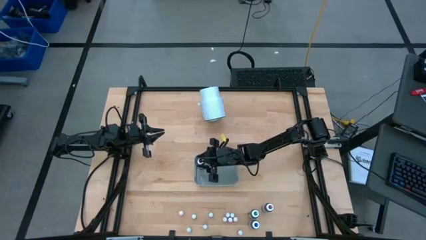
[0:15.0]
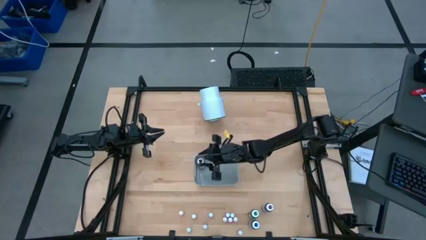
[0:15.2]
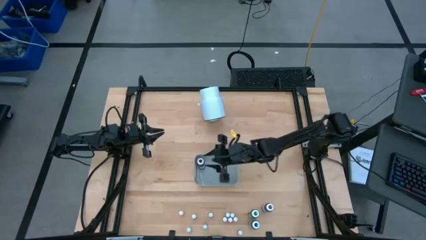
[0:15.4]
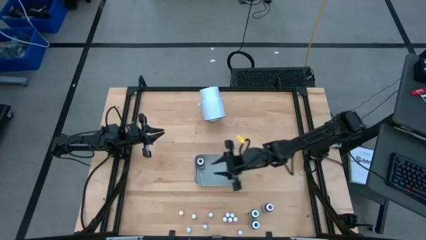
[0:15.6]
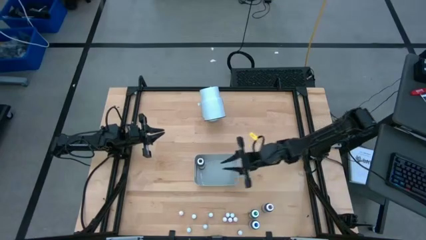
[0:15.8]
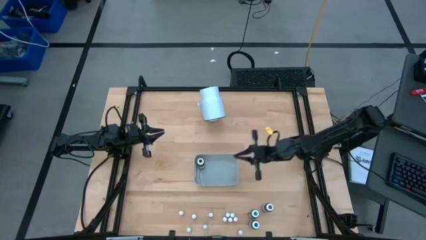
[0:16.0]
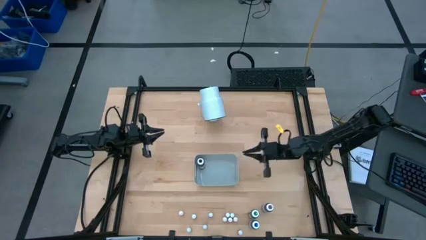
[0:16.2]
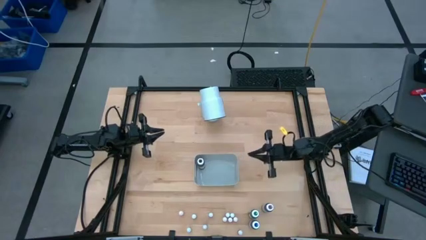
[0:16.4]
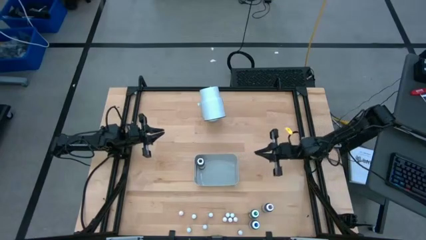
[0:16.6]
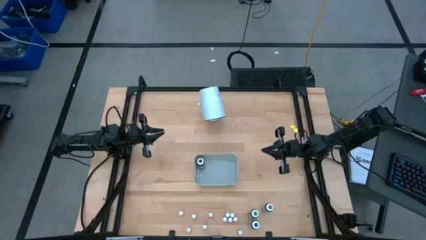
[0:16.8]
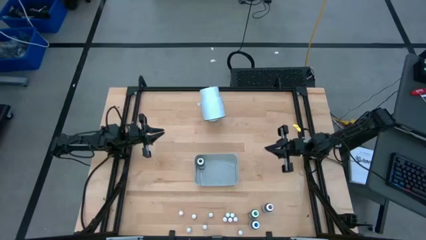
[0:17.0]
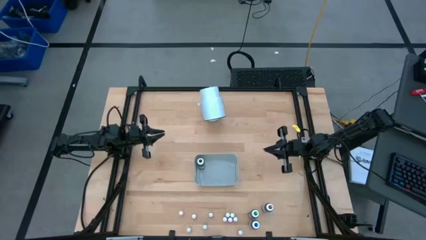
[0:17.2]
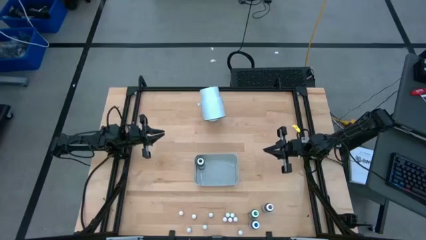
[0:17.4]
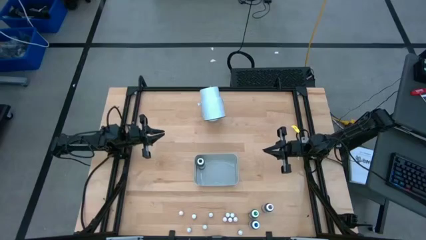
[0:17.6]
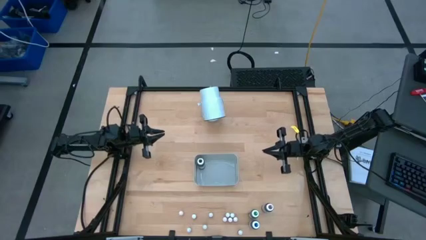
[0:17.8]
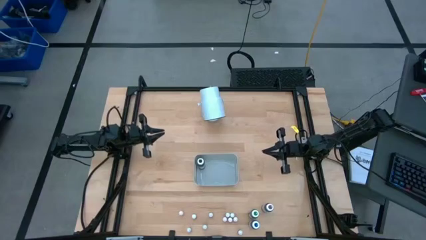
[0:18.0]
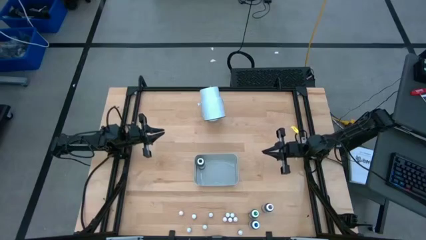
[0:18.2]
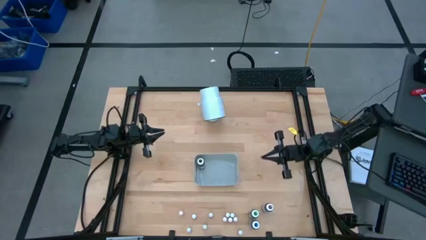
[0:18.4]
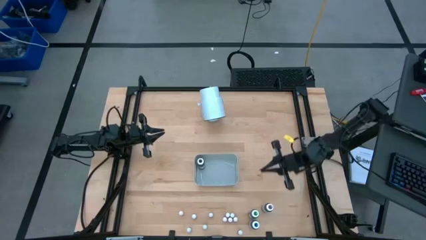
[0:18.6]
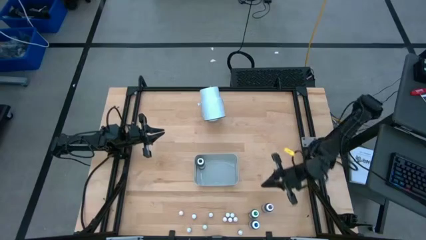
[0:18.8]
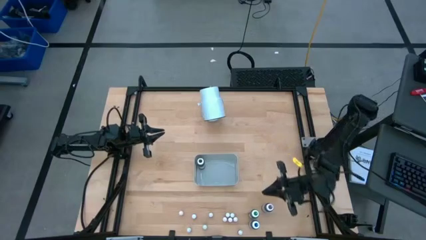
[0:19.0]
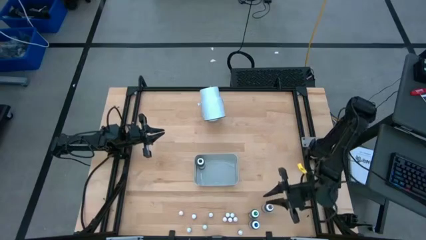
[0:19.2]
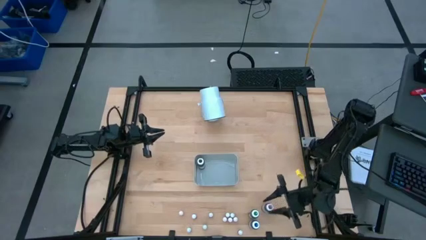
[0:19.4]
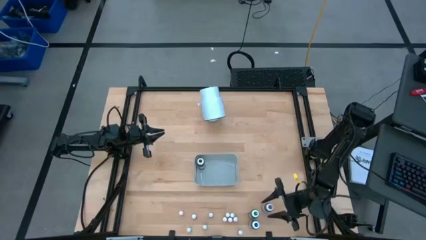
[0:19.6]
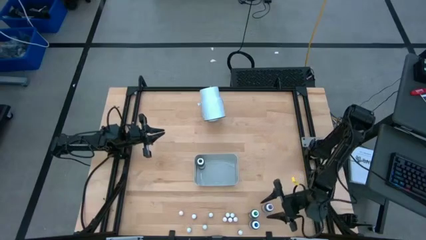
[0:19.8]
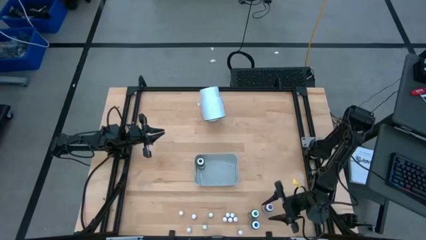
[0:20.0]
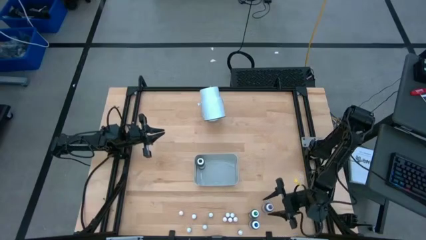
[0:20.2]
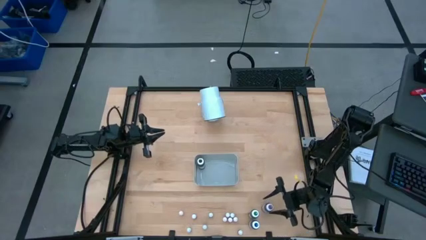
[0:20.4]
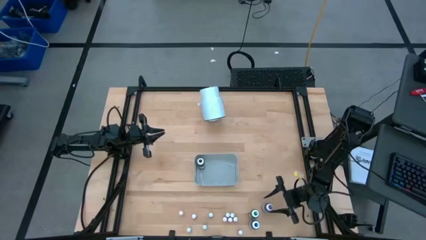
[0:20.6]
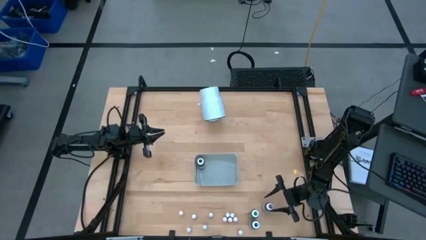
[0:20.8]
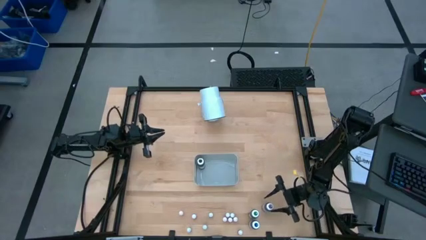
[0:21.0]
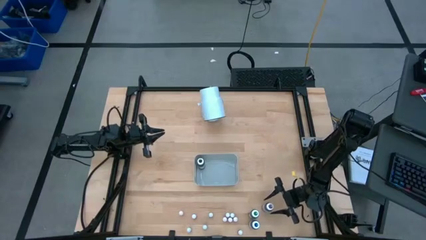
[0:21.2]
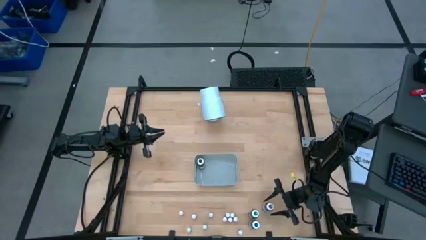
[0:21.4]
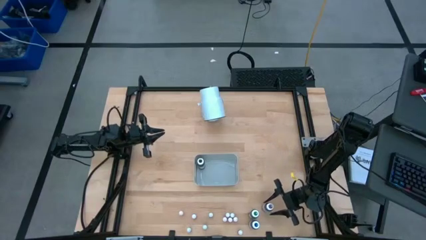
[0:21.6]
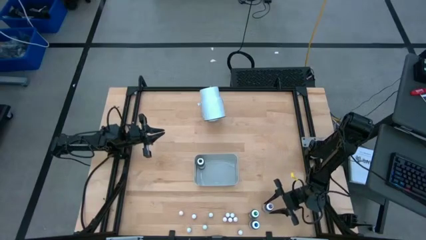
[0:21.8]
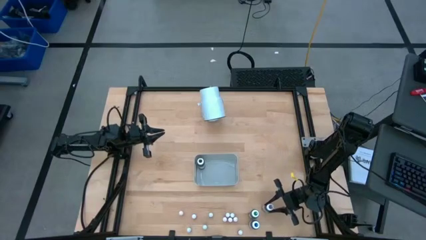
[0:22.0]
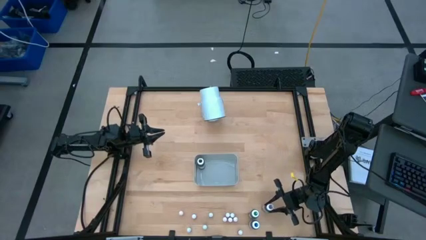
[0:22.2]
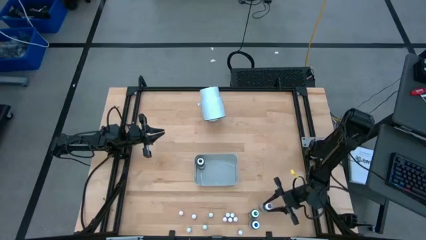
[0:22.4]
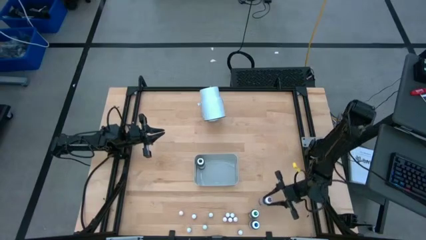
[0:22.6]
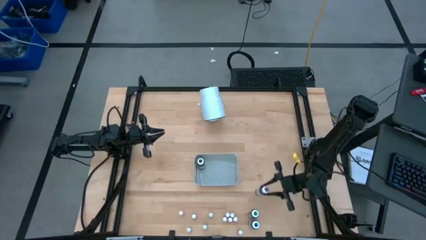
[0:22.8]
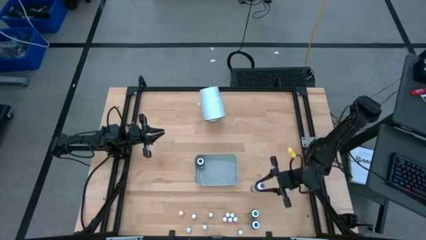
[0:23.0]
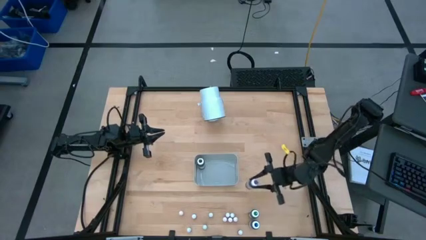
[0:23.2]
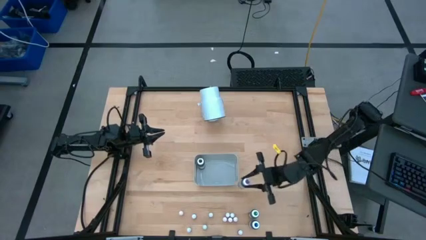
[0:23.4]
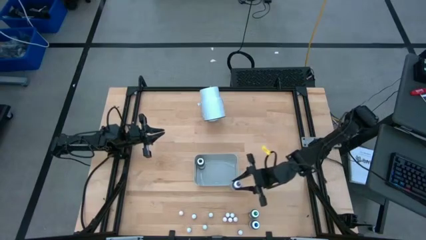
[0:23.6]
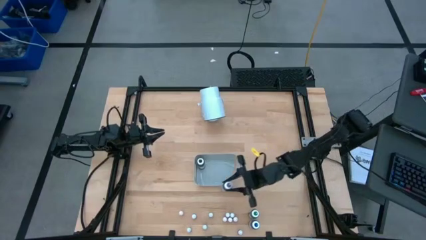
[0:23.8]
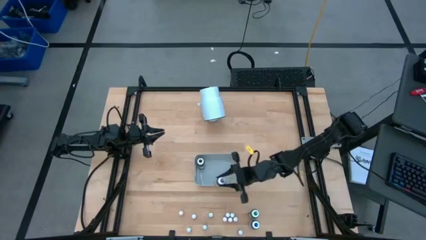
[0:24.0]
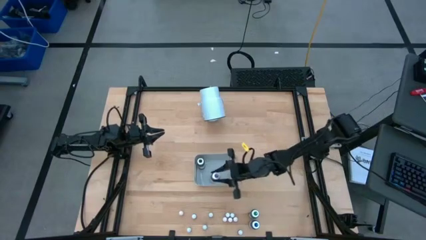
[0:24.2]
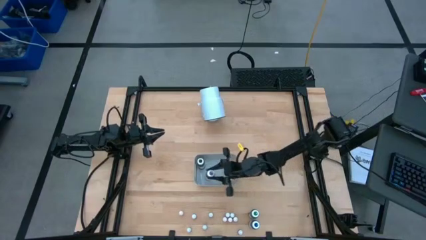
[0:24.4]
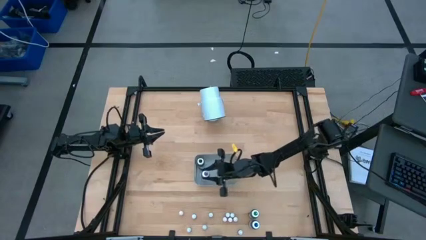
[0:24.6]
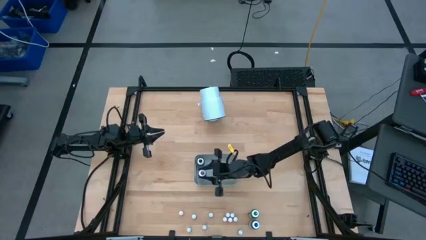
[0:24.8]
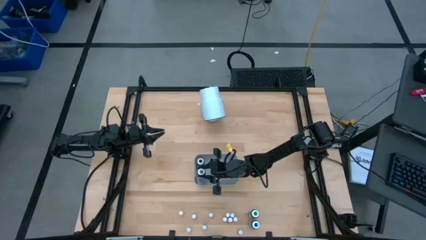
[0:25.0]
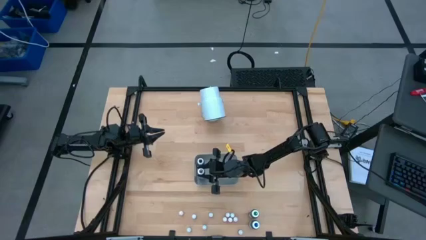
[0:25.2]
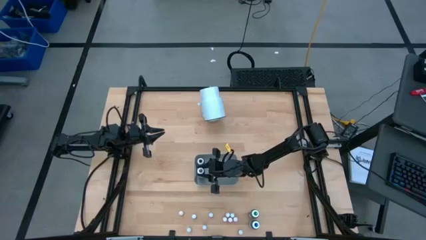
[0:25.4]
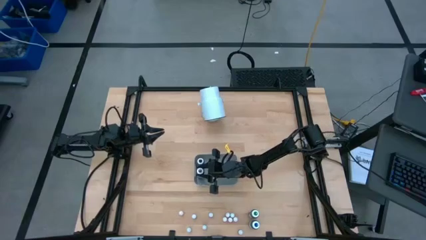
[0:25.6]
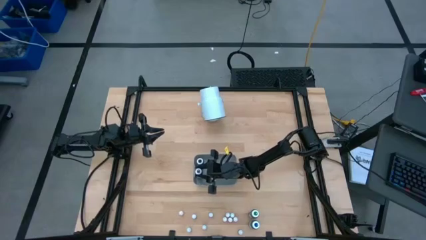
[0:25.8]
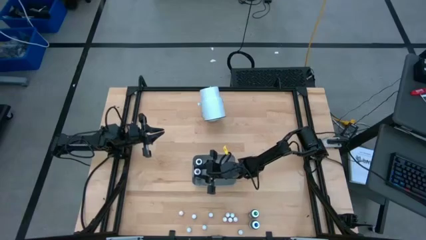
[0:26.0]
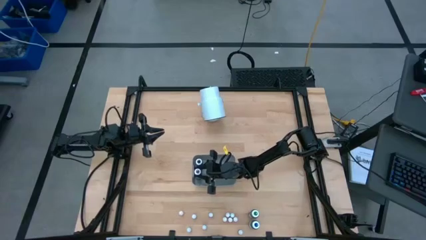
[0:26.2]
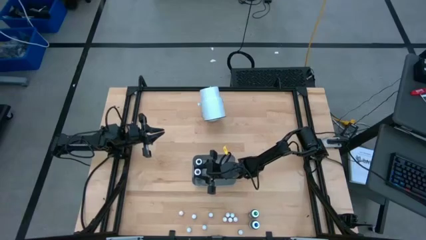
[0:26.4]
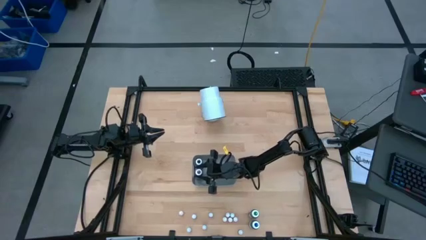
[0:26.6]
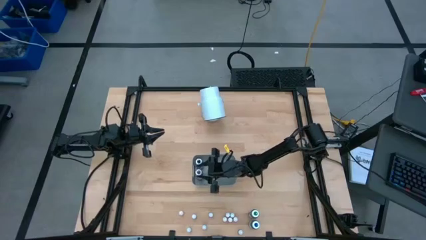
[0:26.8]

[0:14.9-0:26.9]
Task: Pick & Place food coloring
Put the big violet food coloring bottle into the gray bin

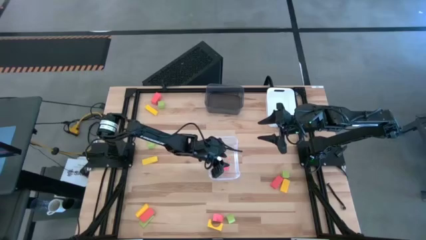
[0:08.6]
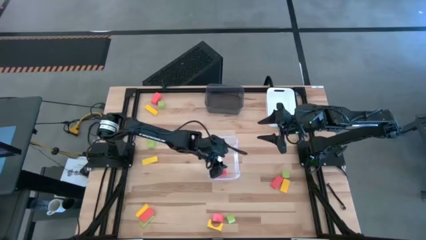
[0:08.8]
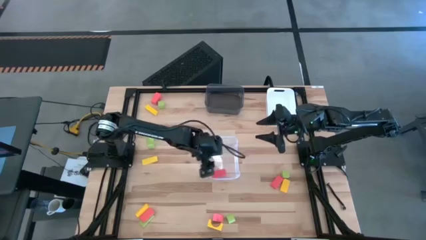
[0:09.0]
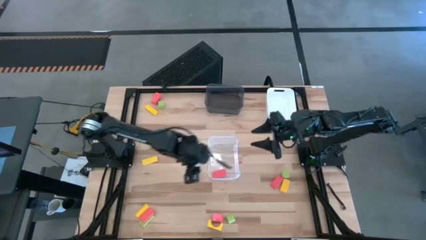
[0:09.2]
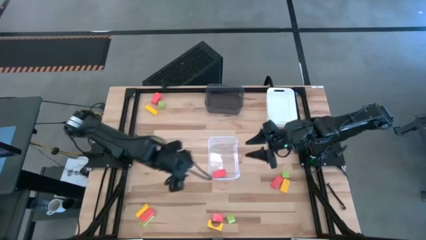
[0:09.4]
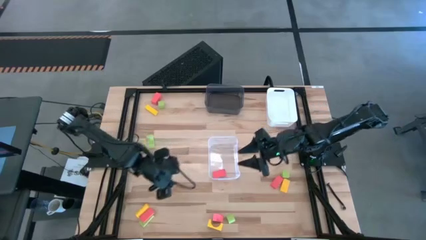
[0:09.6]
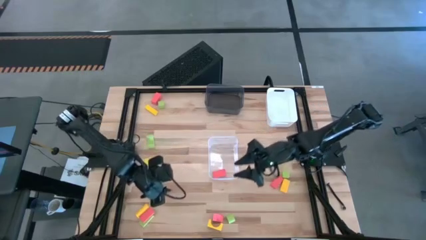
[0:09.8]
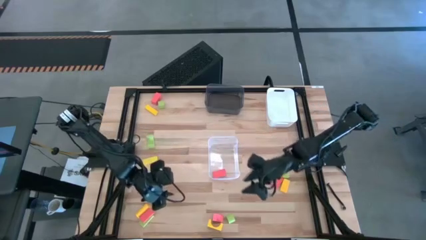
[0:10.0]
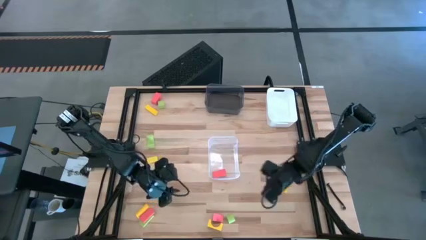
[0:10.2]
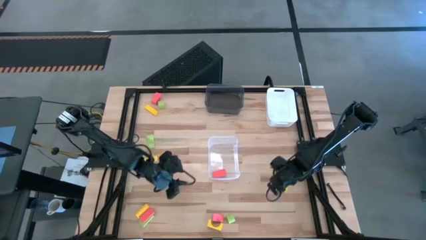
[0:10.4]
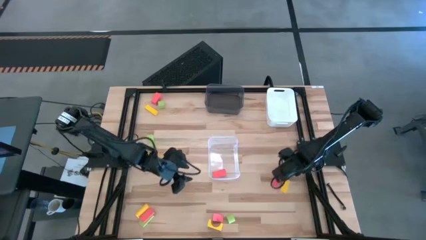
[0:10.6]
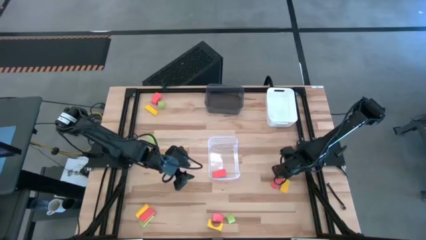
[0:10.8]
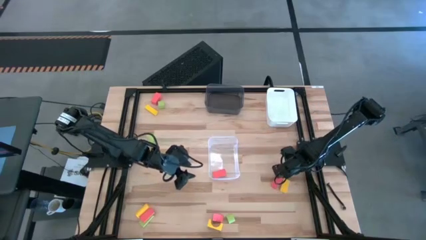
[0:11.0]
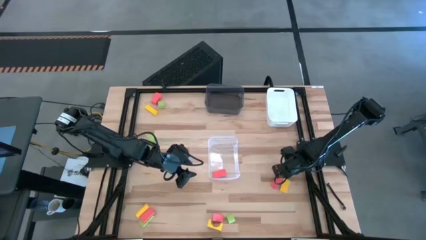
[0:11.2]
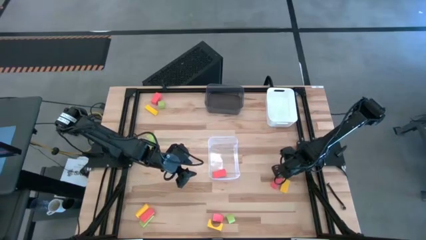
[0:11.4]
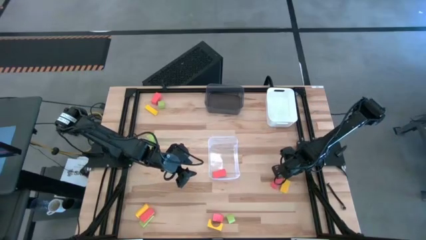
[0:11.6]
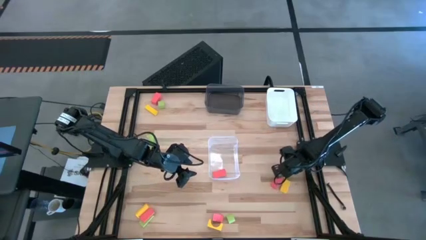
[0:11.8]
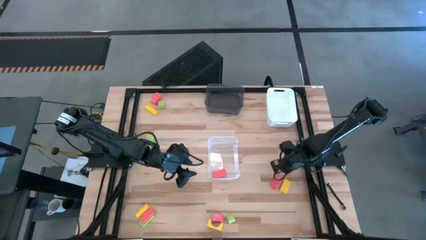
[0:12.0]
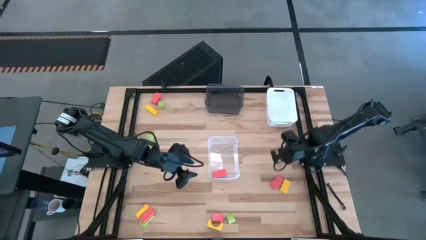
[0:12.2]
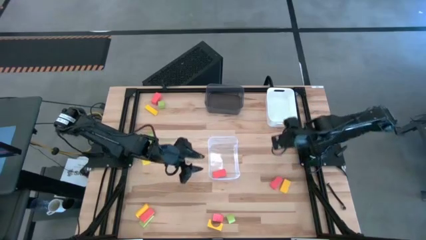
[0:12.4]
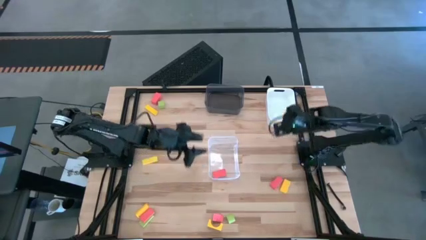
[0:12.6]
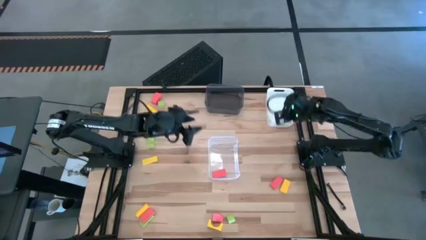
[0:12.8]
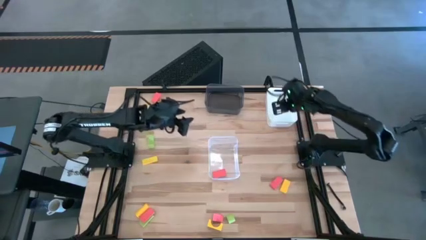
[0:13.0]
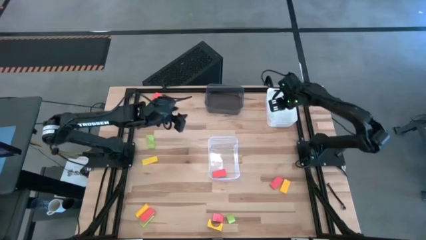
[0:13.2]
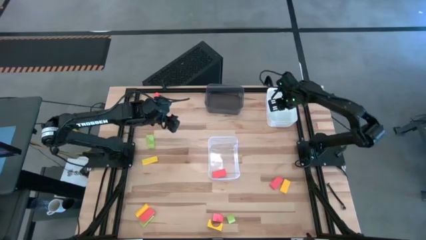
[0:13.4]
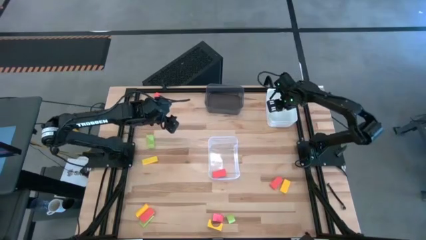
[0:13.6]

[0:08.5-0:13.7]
Task: Sort & place blocks by color
Put the green block into the white bin
